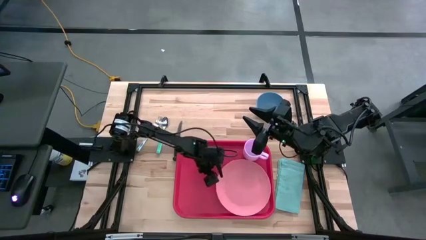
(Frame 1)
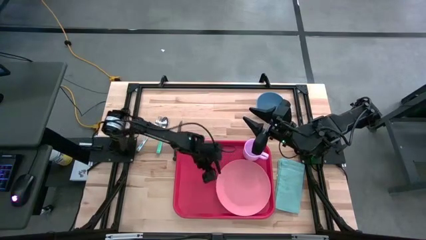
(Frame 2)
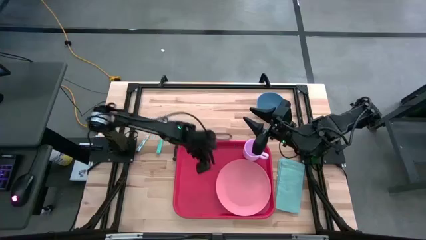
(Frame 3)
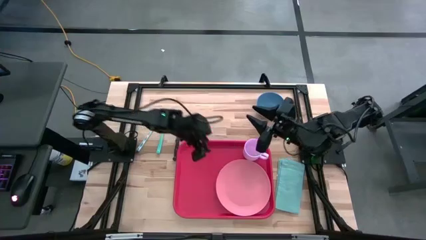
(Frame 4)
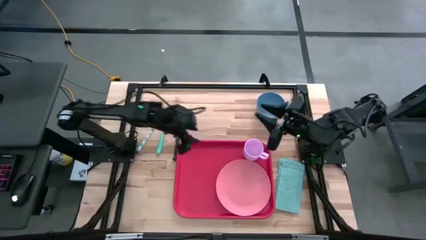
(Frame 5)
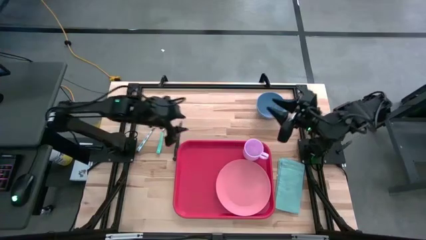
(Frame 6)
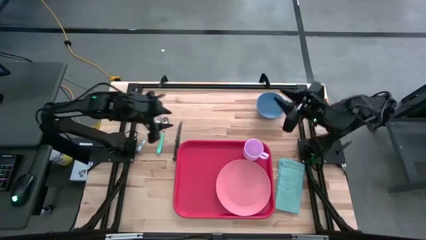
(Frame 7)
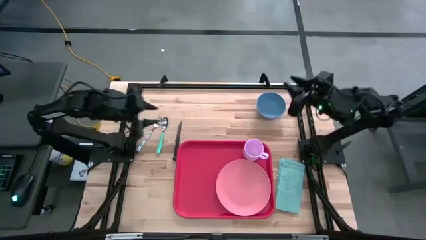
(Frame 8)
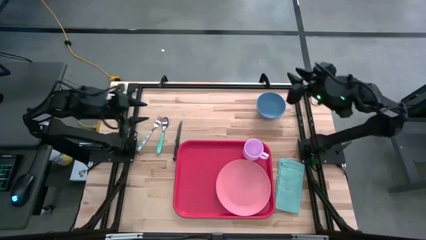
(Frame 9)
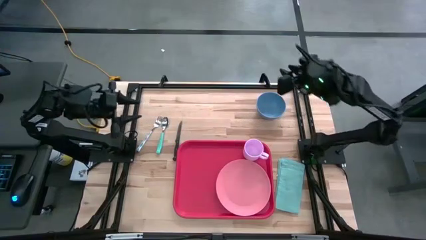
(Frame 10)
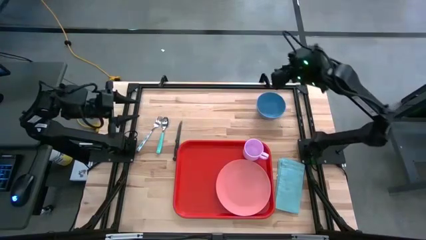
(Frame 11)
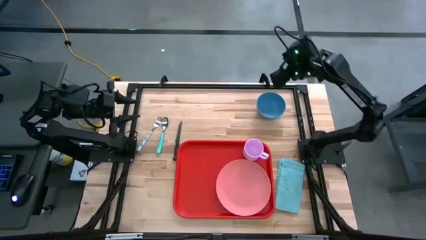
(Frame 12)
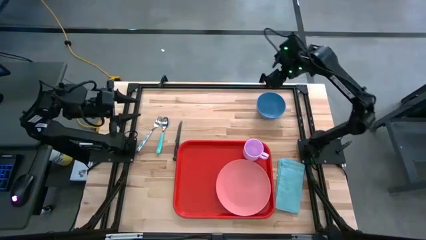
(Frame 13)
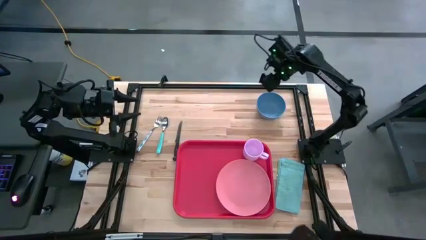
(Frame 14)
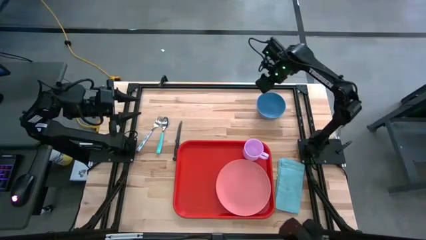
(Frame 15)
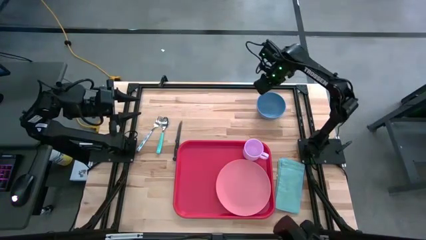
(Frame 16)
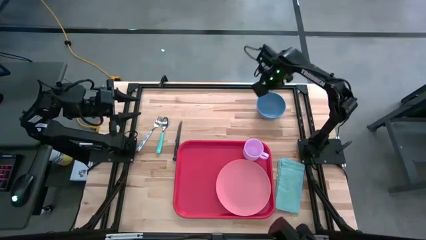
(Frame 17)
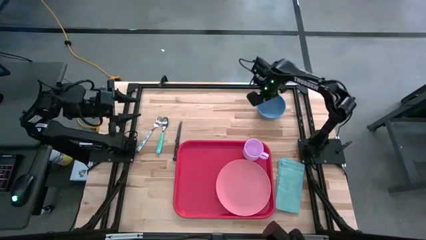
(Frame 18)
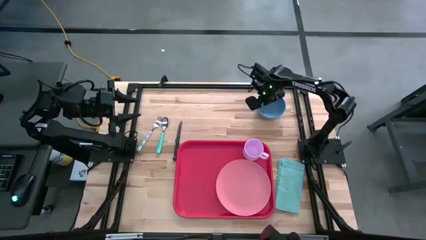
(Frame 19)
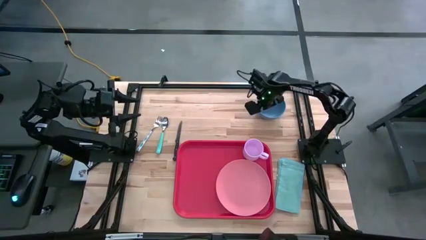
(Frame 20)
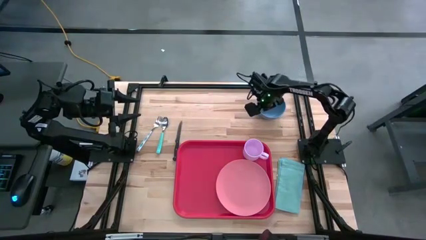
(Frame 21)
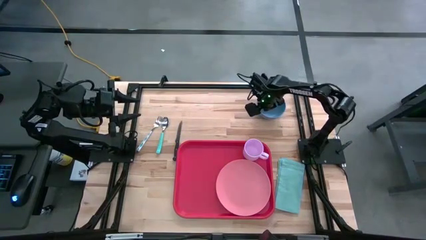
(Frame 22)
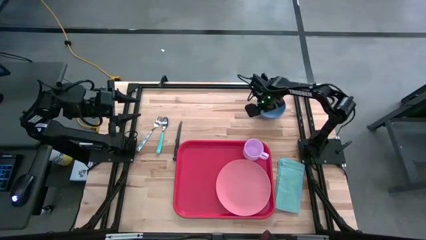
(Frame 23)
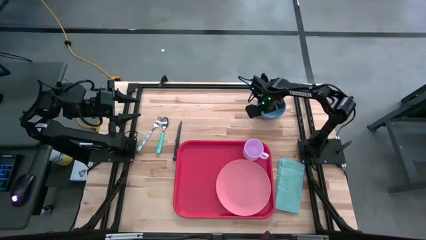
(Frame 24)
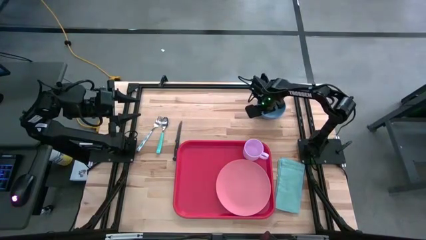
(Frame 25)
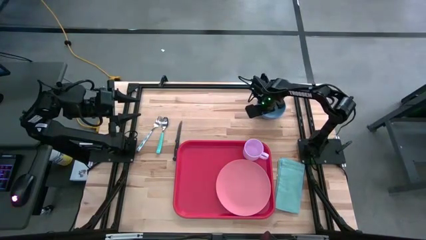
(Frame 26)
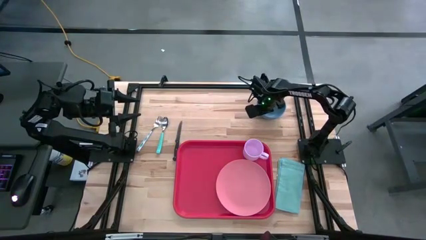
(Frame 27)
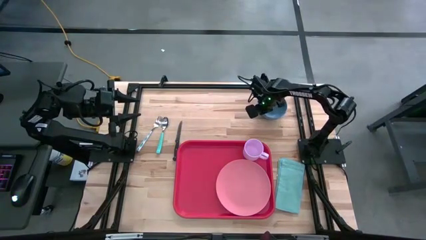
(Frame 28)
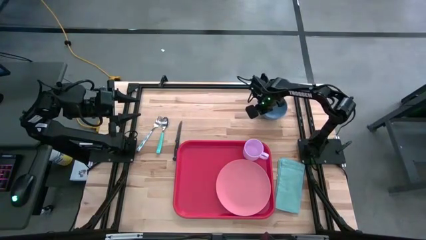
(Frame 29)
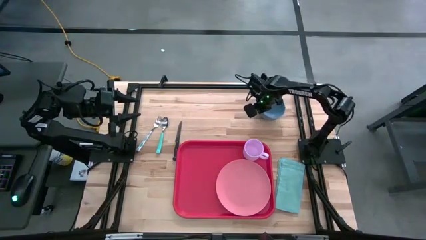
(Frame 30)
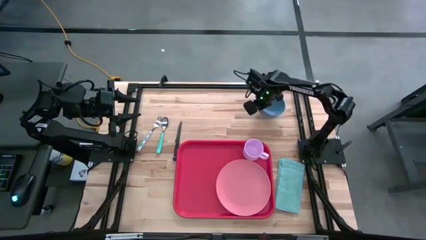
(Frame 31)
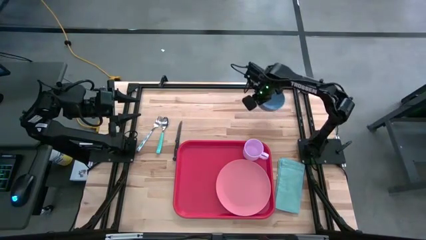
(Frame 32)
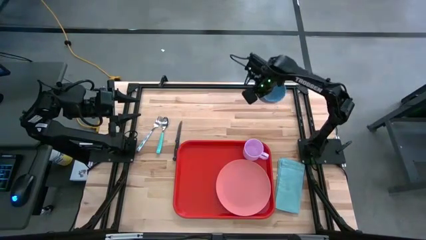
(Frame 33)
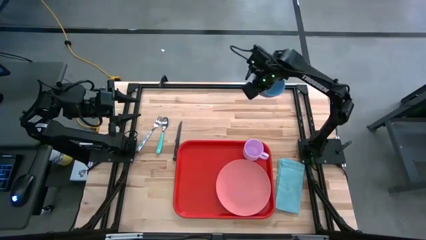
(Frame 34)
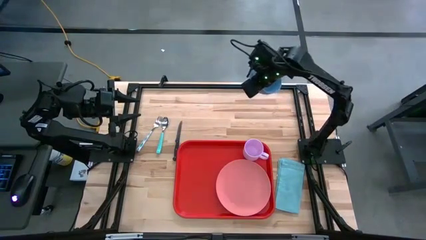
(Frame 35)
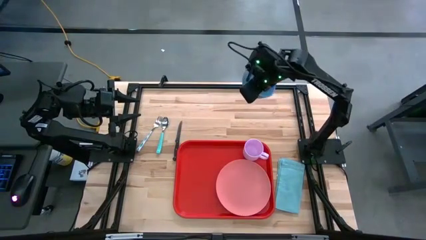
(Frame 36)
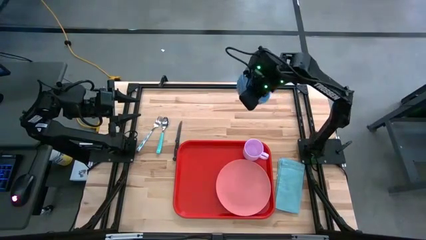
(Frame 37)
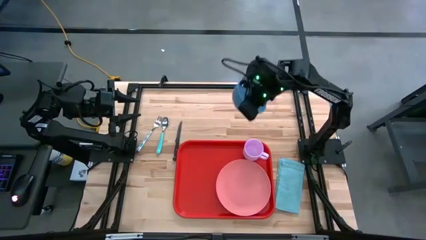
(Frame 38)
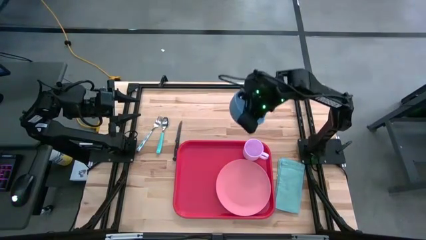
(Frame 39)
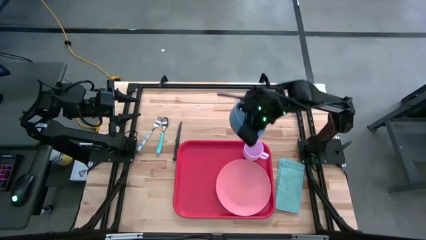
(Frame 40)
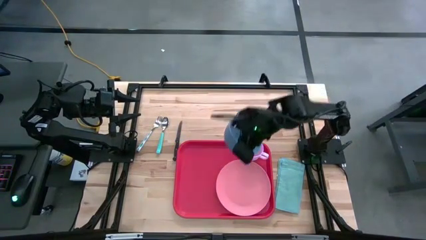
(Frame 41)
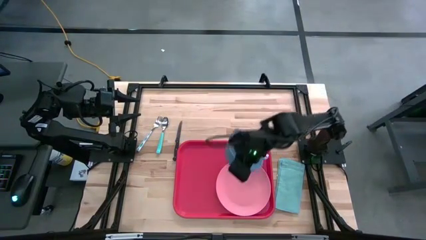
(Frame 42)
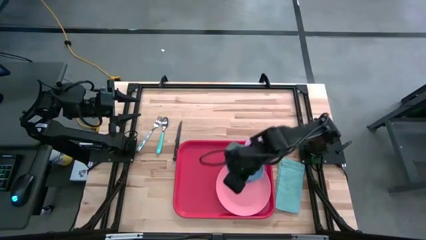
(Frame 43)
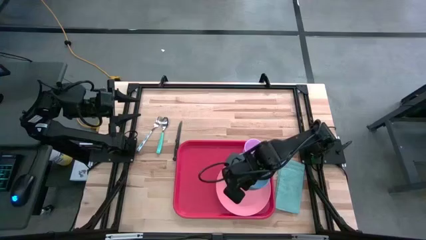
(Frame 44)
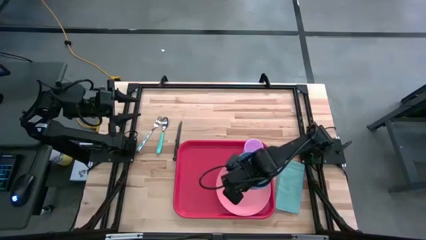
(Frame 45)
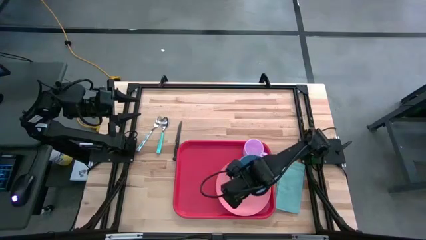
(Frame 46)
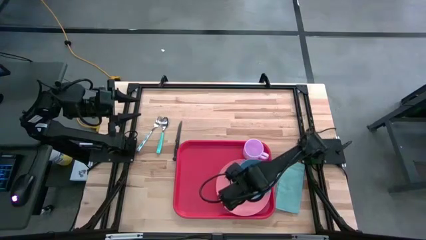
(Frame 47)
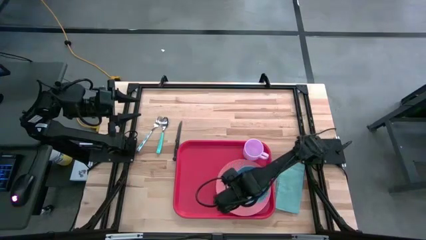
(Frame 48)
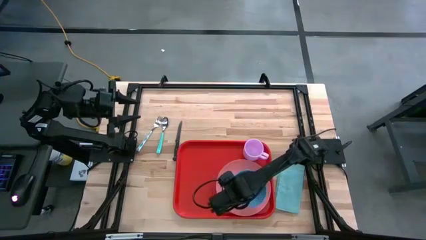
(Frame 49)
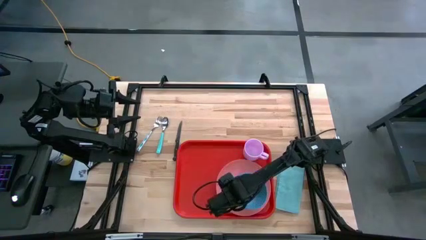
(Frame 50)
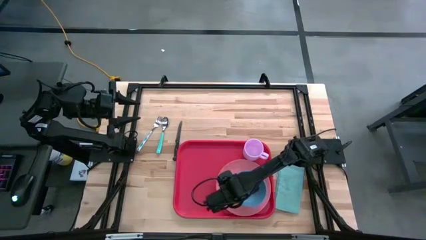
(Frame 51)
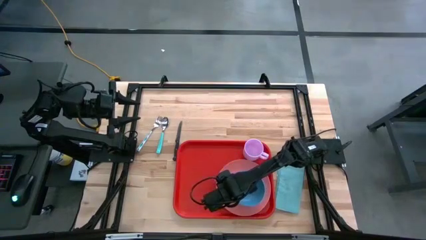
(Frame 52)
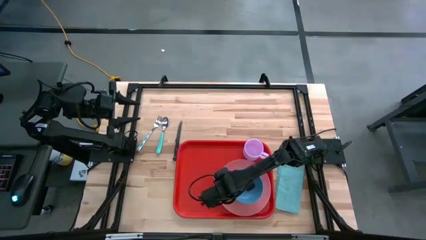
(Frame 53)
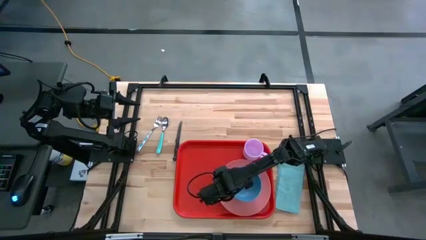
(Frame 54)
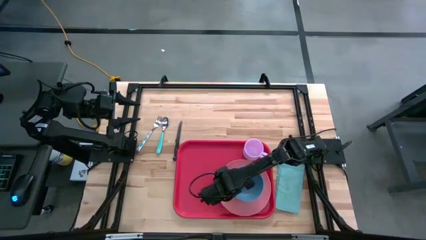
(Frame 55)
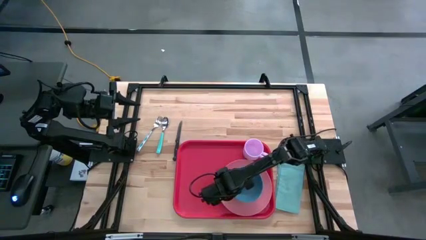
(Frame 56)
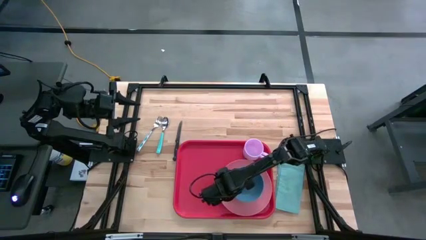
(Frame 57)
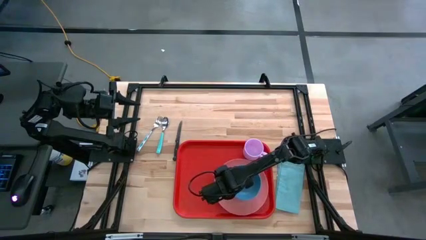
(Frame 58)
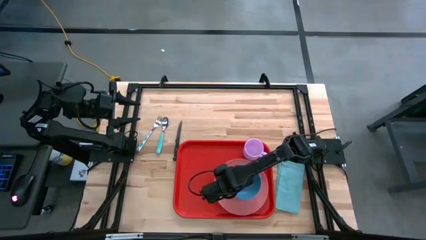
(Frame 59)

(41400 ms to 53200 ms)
Task: Set up tray
Put the blue bowl into the pink plate
